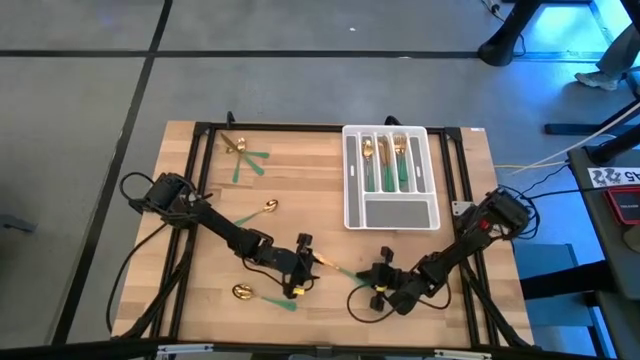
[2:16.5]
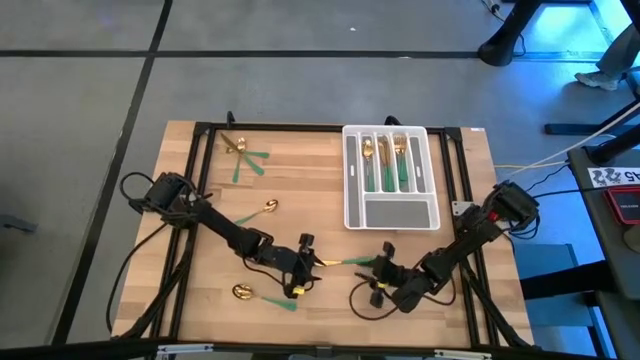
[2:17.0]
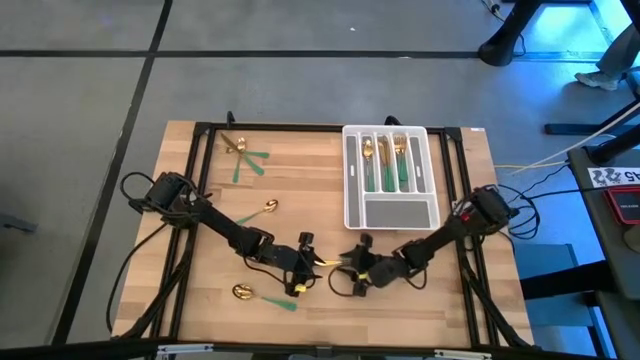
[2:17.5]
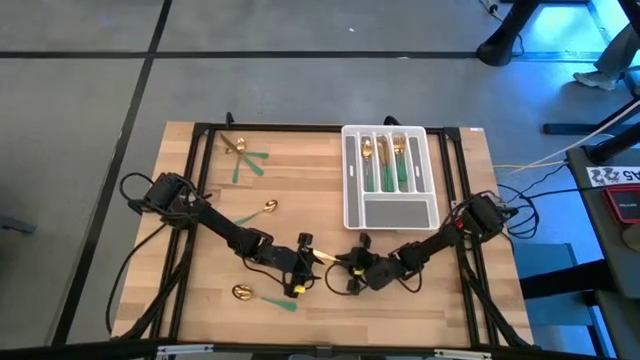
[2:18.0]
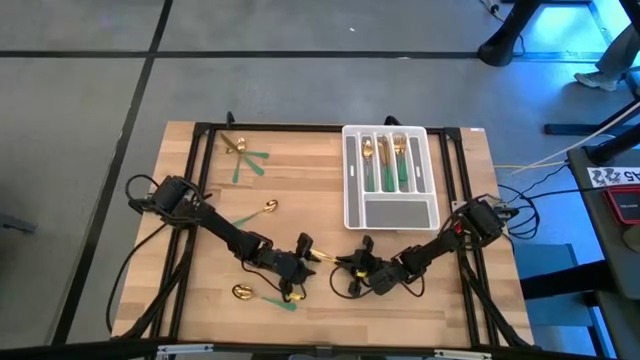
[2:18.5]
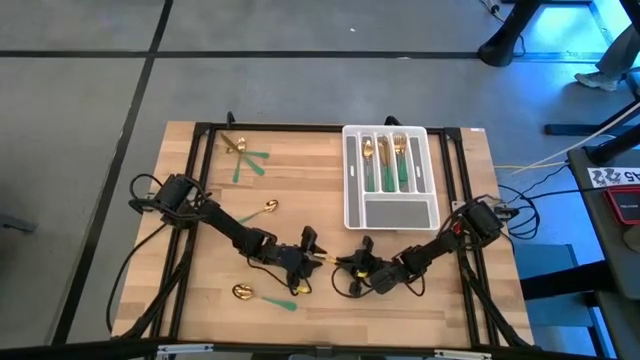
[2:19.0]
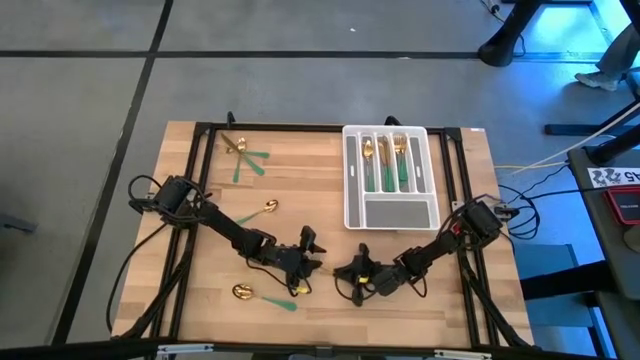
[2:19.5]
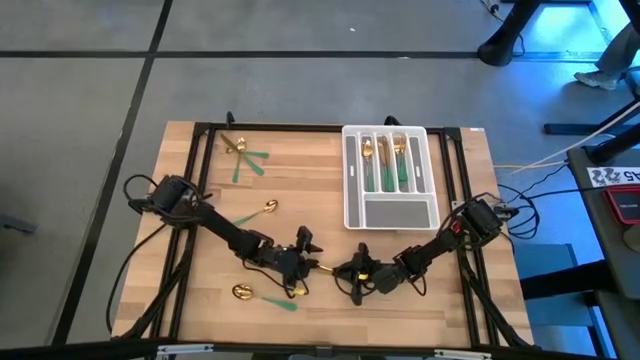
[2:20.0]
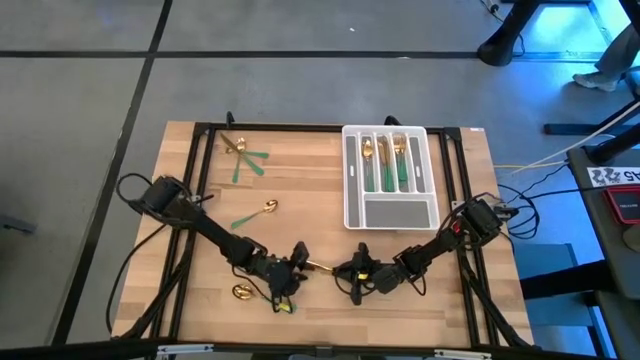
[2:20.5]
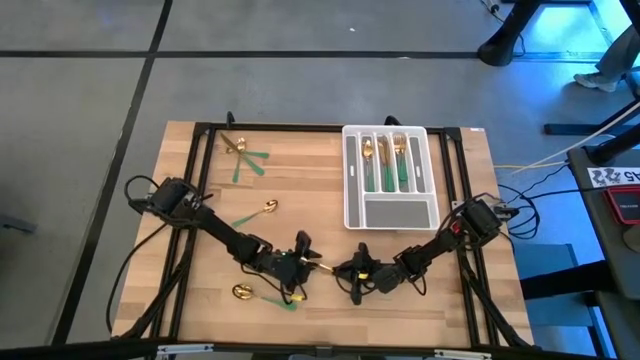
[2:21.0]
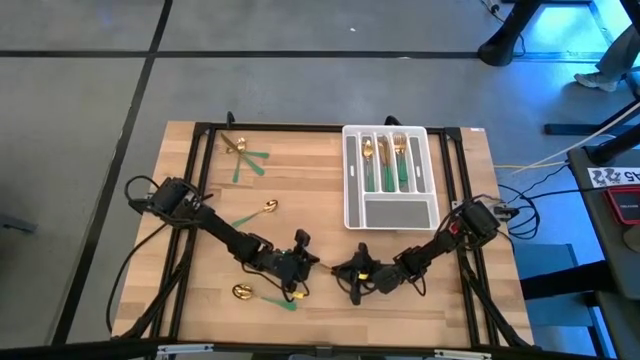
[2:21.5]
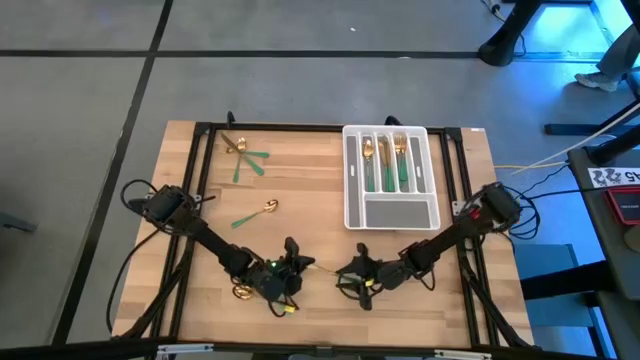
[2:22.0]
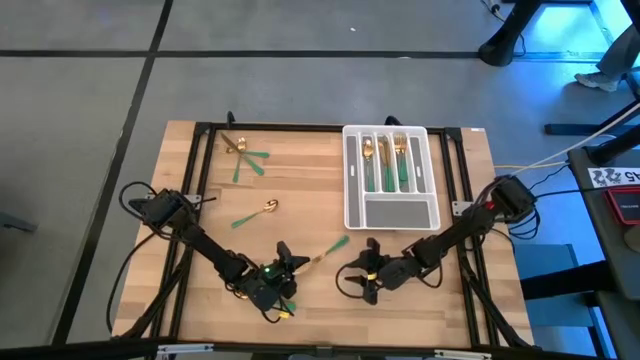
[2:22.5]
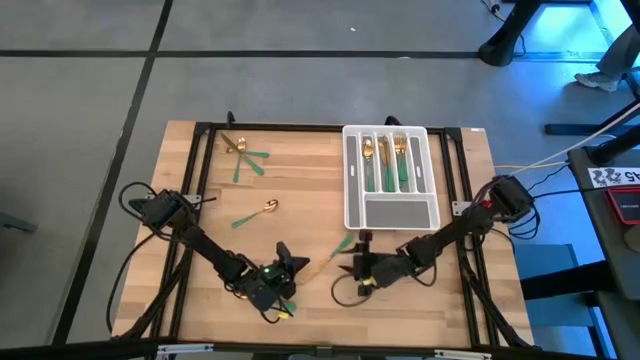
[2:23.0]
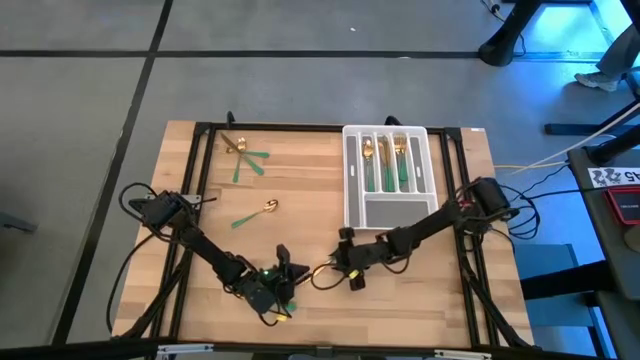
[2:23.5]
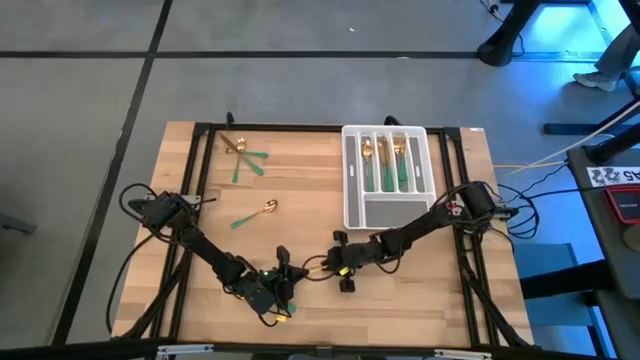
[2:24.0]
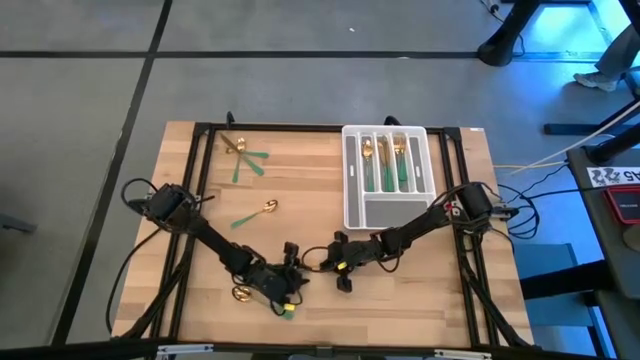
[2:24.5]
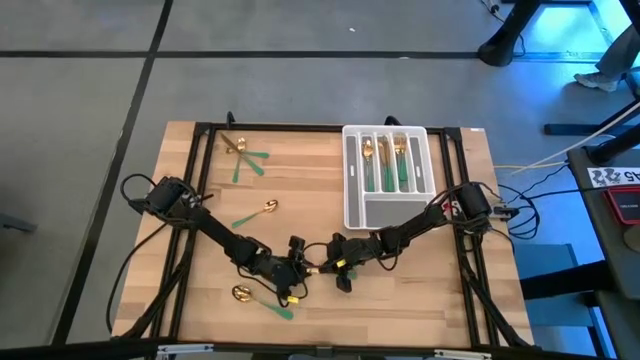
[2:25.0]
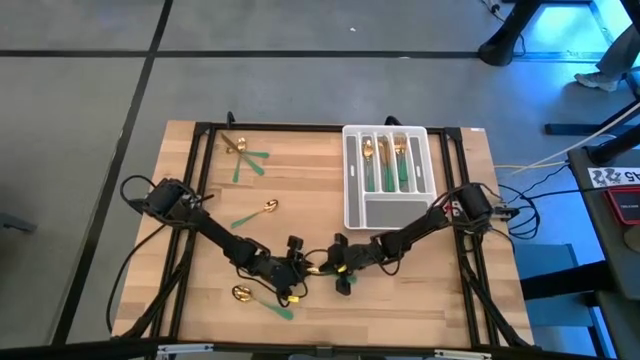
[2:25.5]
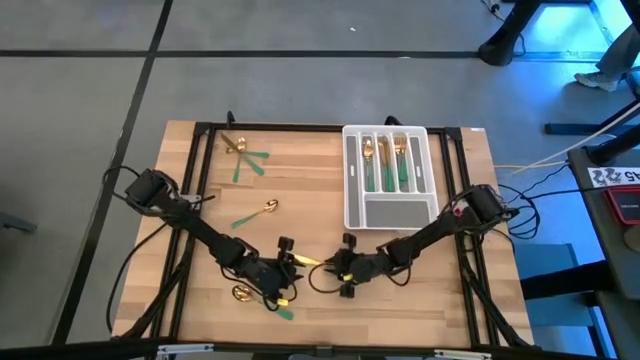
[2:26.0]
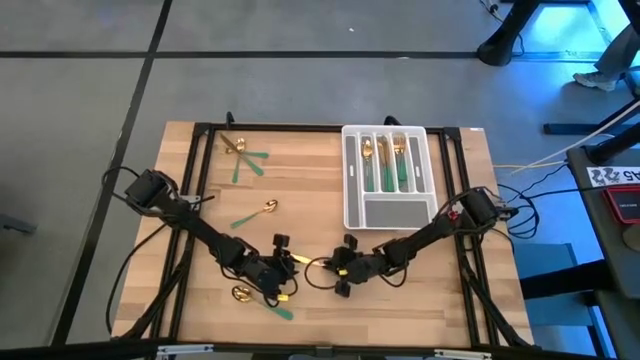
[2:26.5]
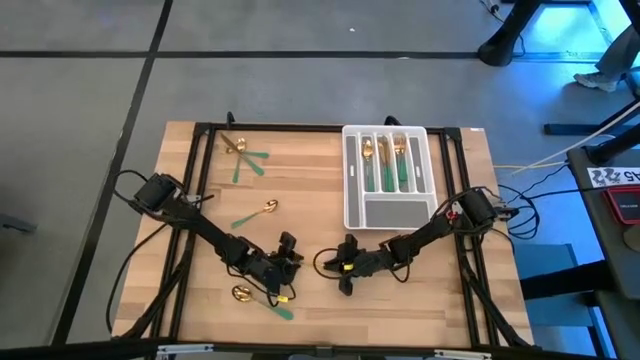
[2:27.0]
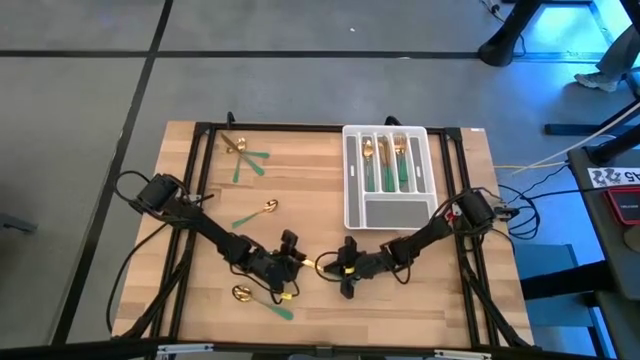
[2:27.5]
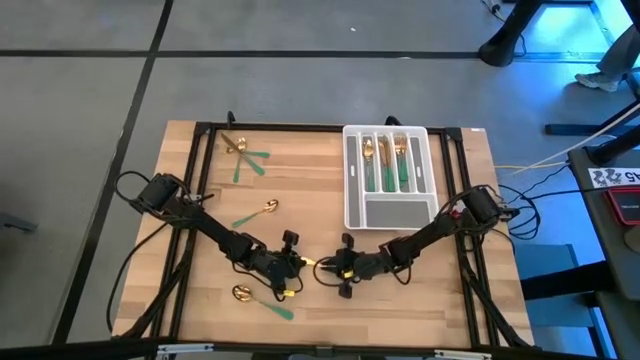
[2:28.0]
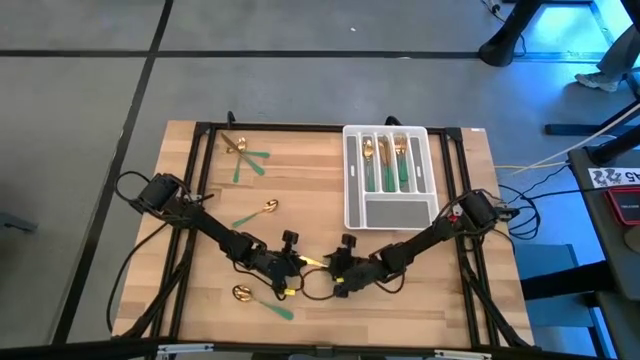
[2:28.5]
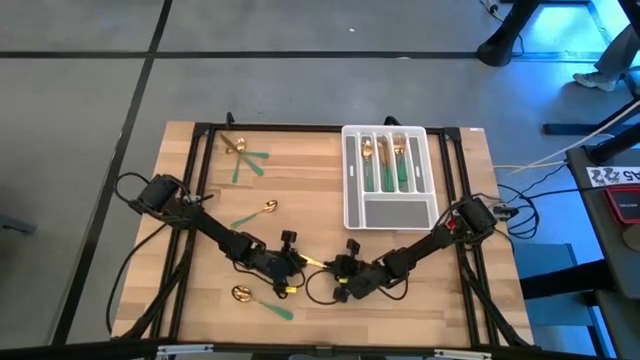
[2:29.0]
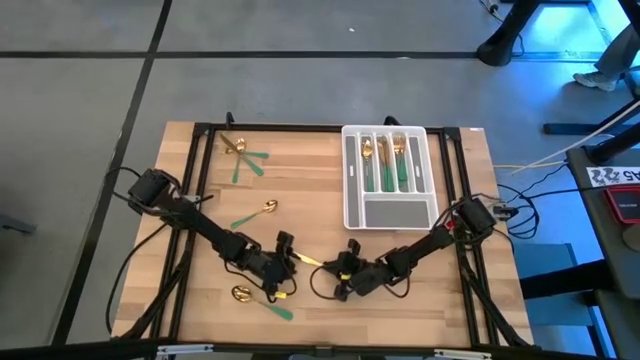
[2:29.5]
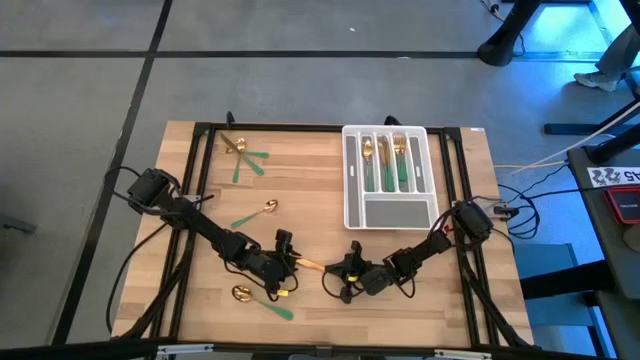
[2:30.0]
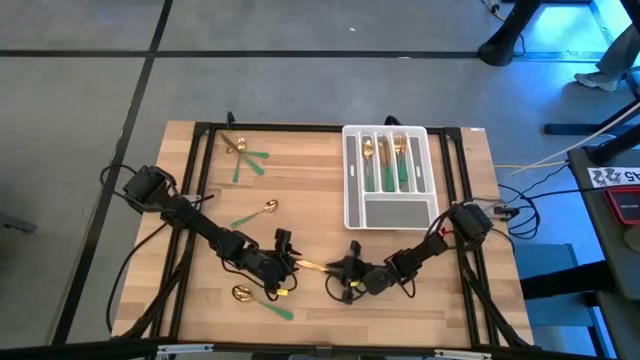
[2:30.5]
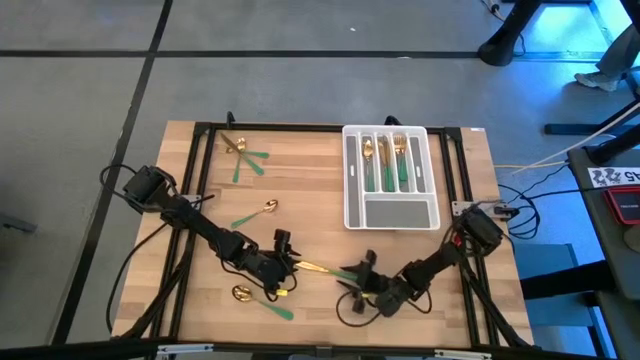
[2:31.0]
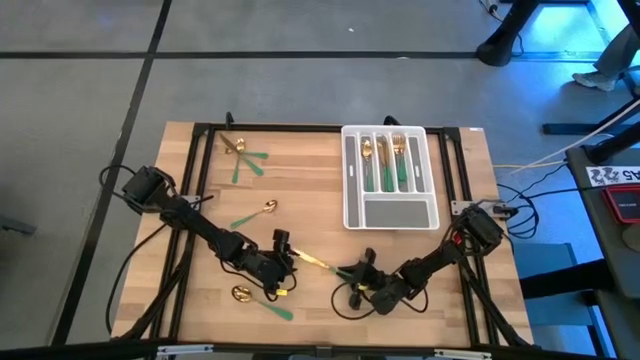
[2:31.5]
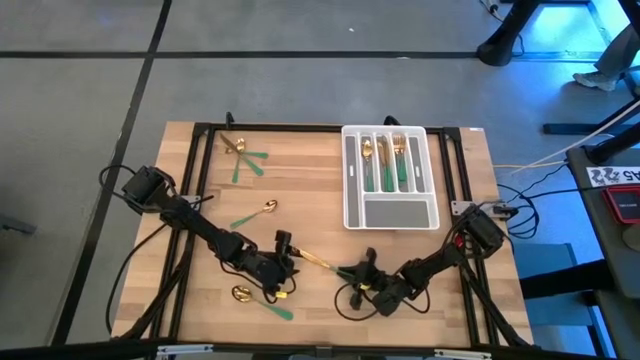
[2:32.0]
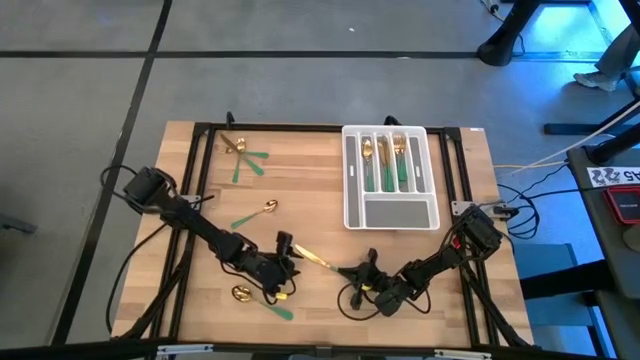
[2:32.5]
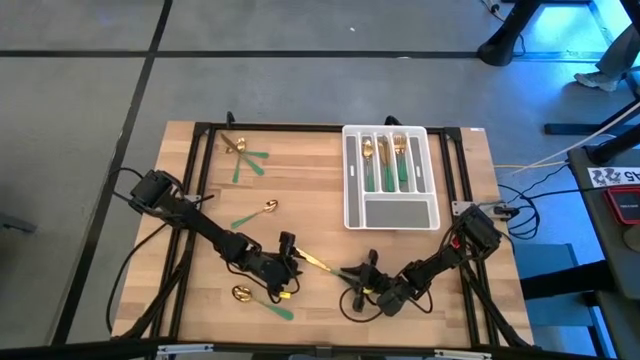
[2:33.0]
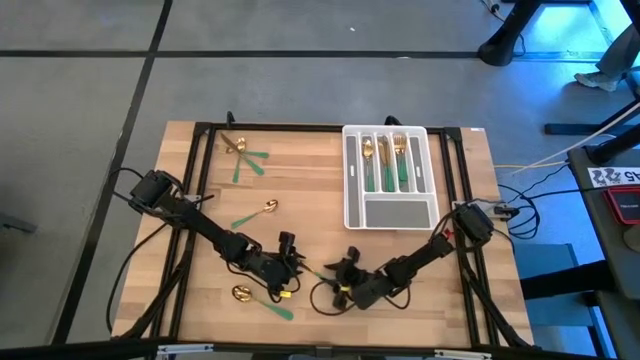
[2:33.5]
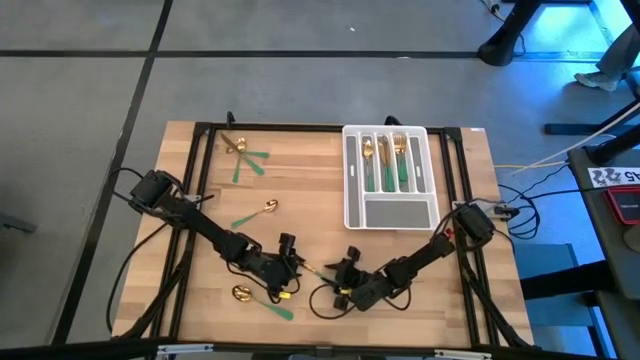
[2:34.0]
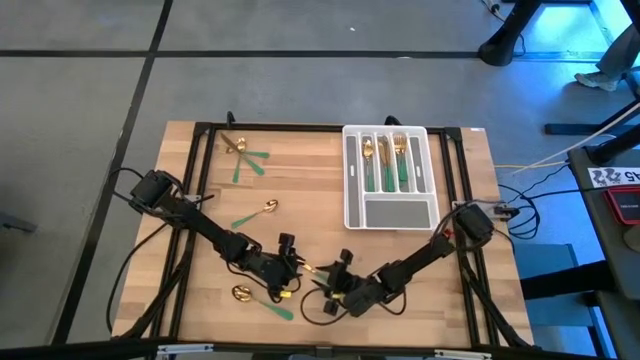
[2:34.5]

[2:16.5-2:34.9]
Task: Sort silverware
Put the green knife into the silverware tray

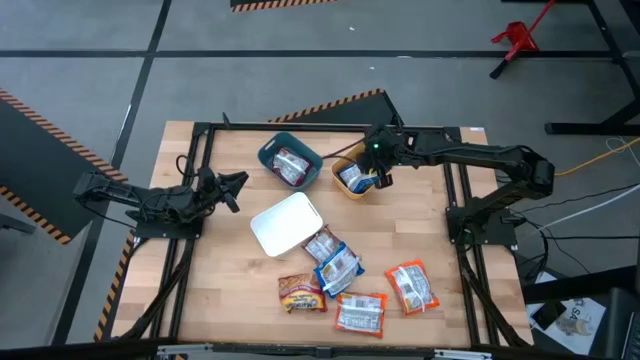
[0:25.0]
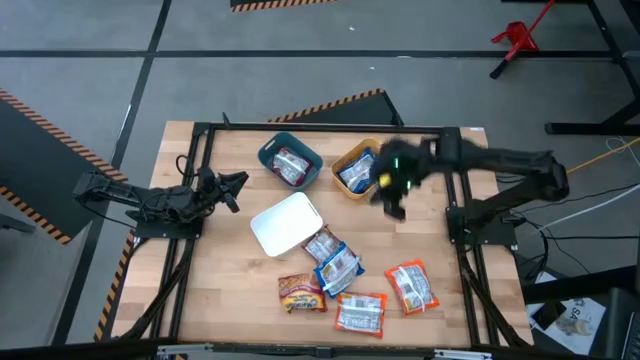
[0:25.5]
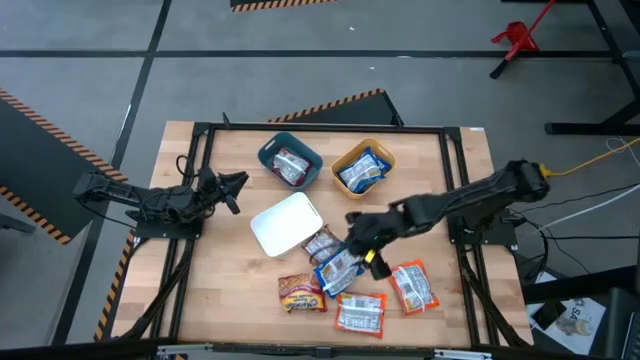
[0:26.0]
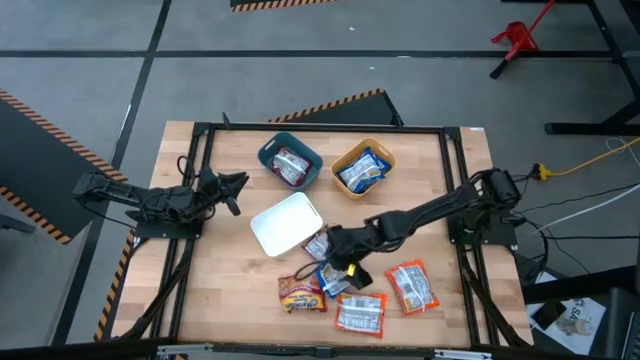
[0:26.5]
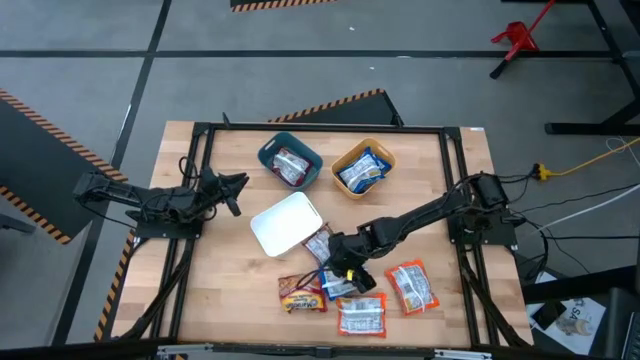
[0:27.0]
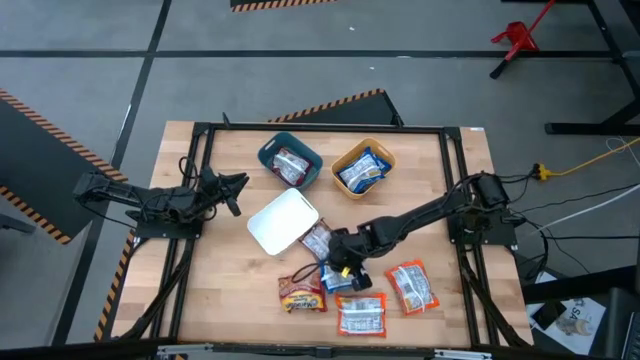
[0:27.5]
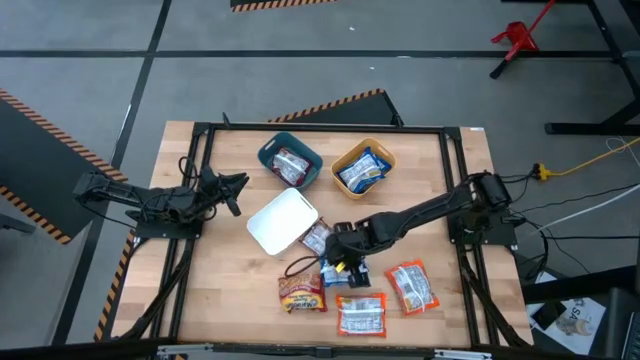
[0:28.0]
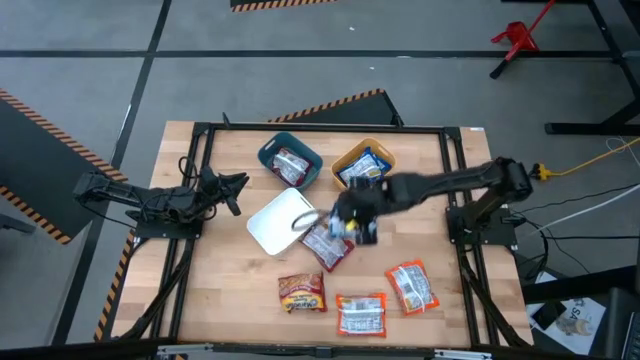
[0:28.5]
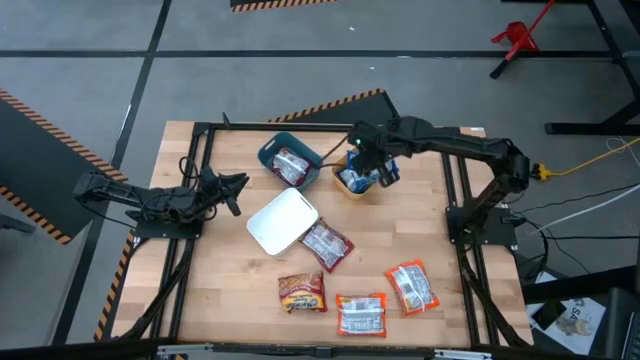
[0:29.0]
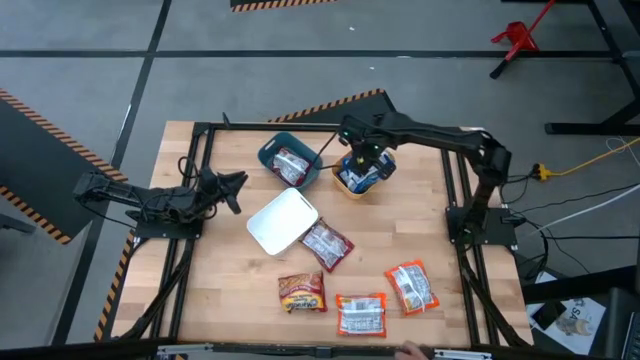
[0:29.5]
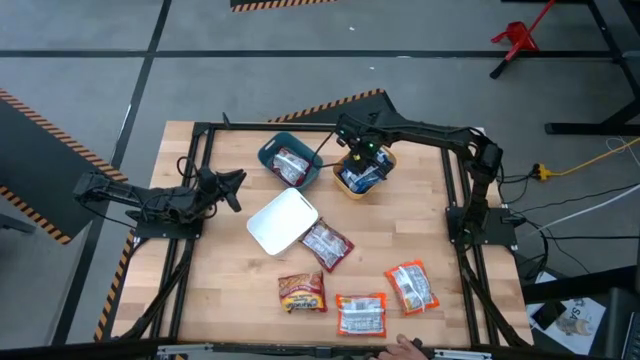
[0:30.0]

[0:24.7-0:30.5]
Task: Sort Maruchan noodles
Put the blue noodle pack into the yellow bin
